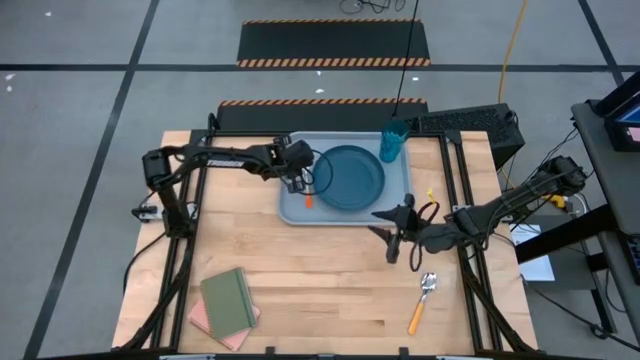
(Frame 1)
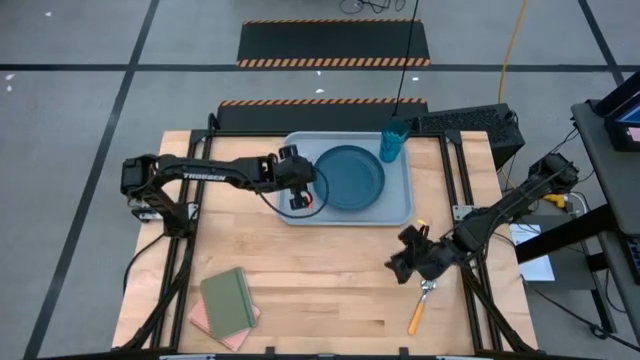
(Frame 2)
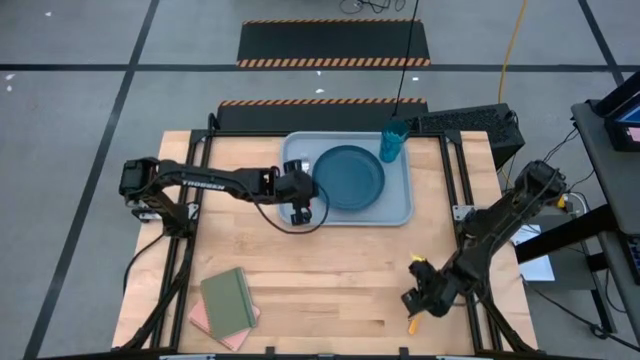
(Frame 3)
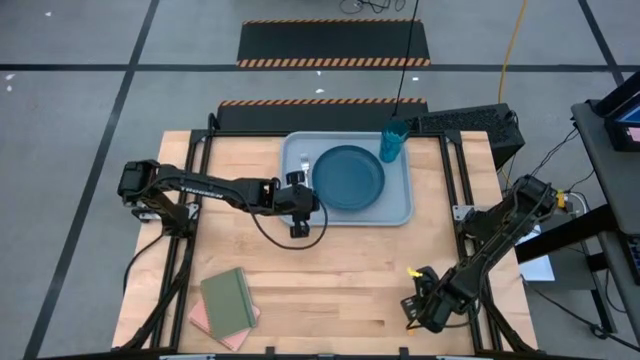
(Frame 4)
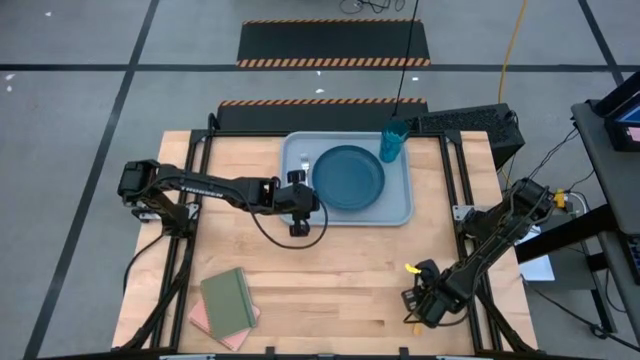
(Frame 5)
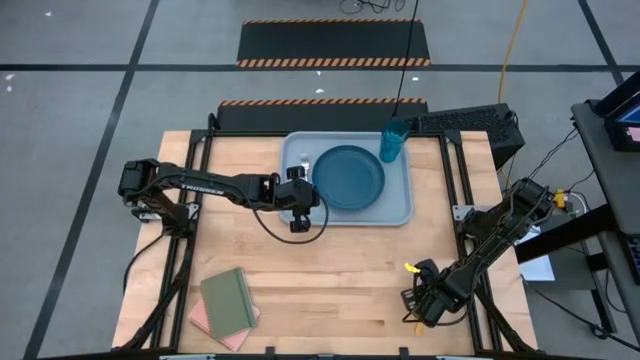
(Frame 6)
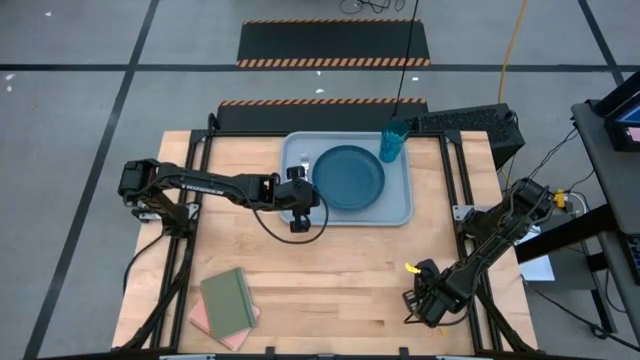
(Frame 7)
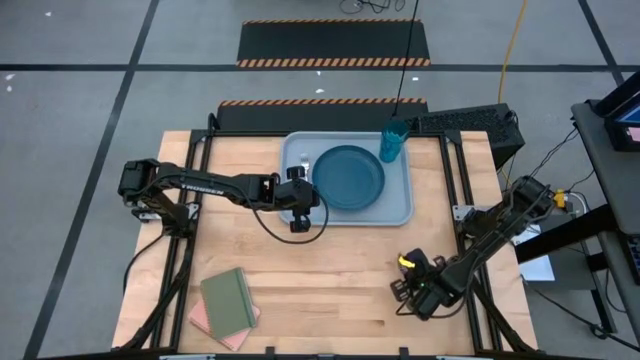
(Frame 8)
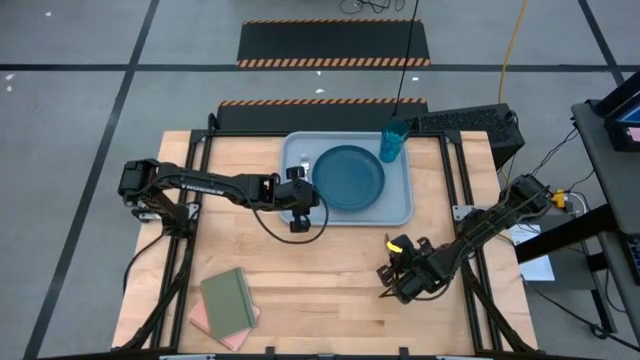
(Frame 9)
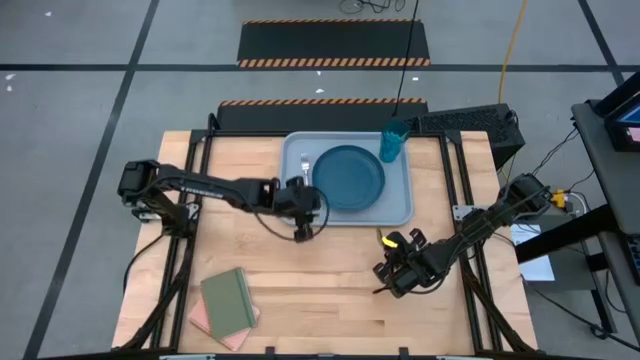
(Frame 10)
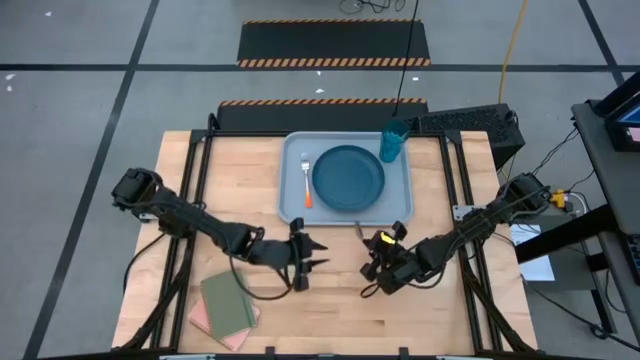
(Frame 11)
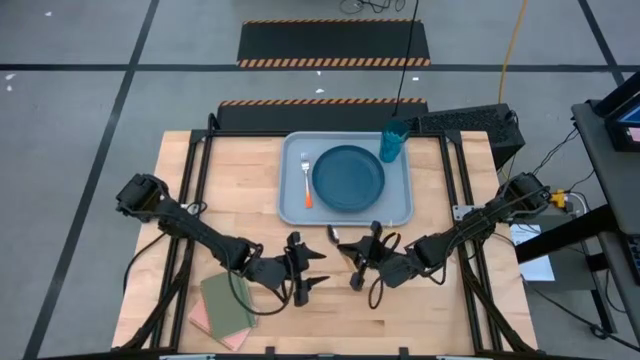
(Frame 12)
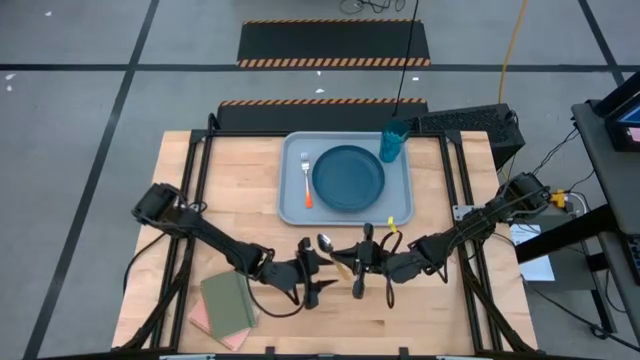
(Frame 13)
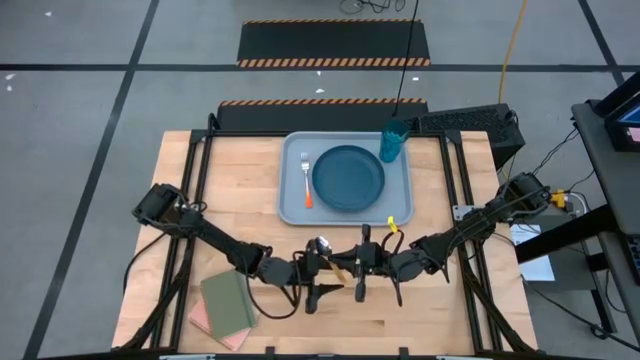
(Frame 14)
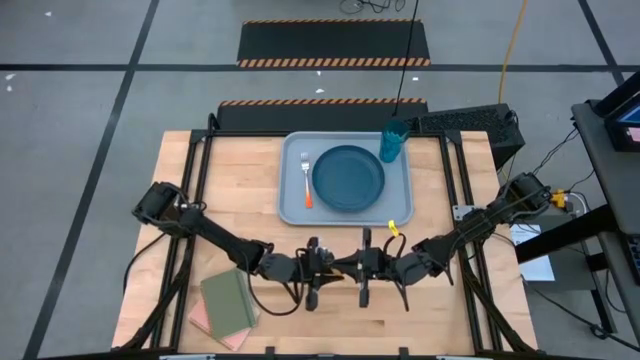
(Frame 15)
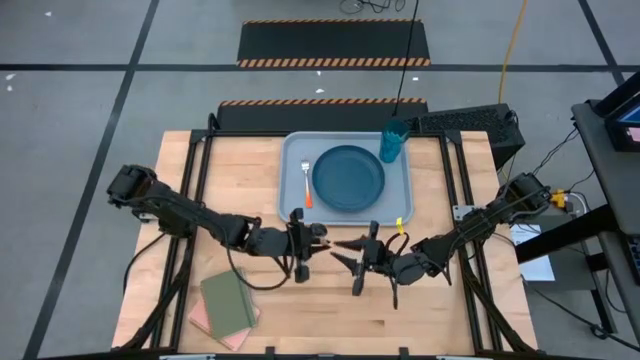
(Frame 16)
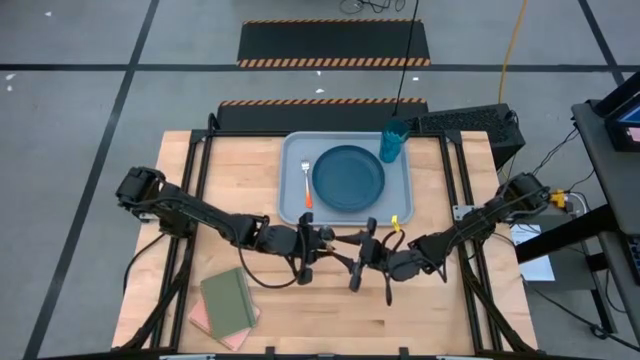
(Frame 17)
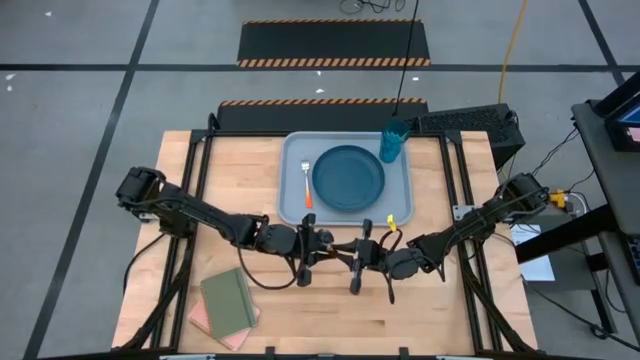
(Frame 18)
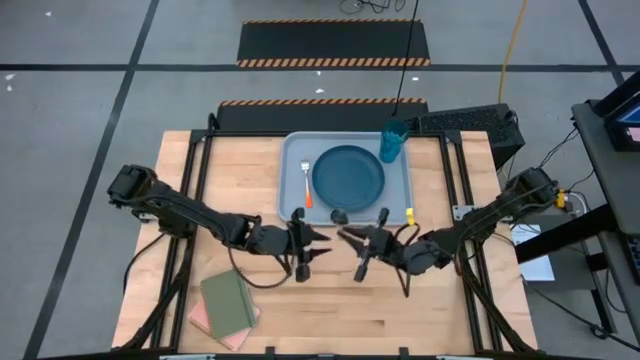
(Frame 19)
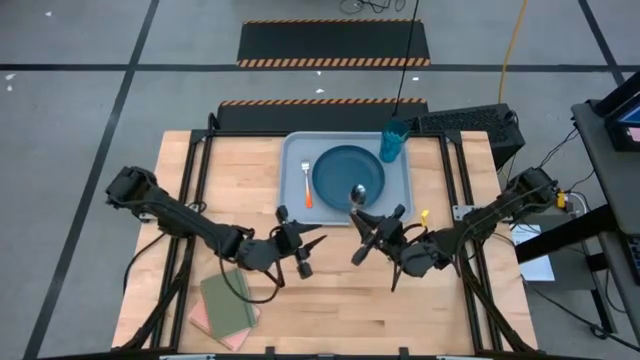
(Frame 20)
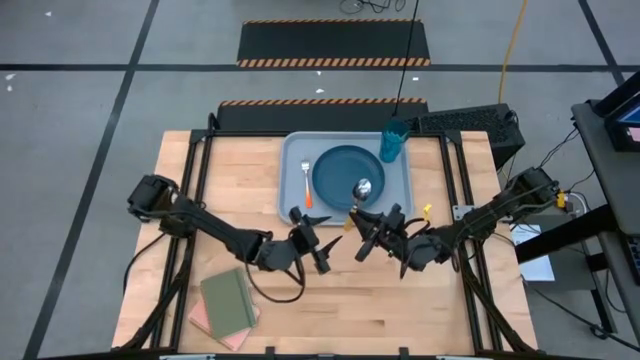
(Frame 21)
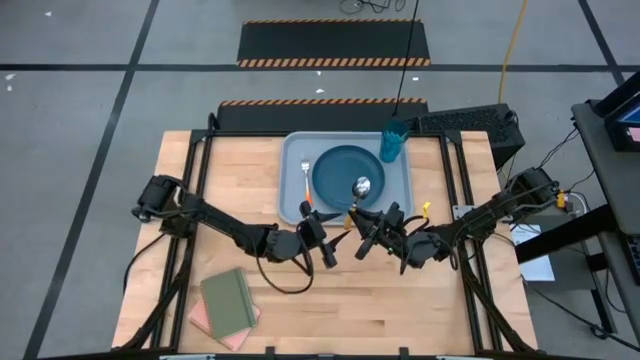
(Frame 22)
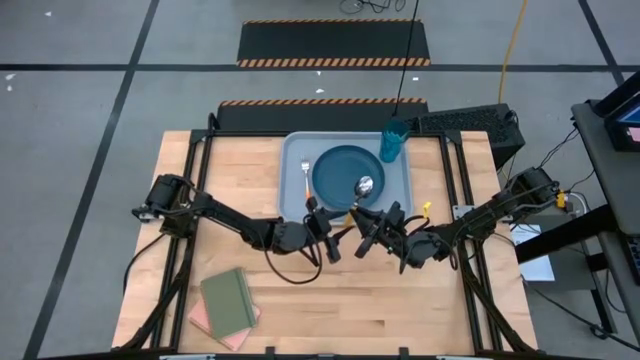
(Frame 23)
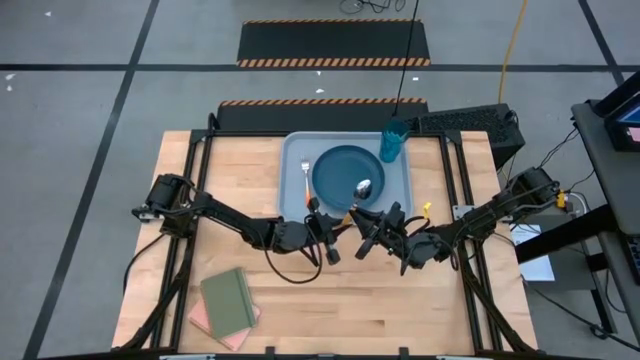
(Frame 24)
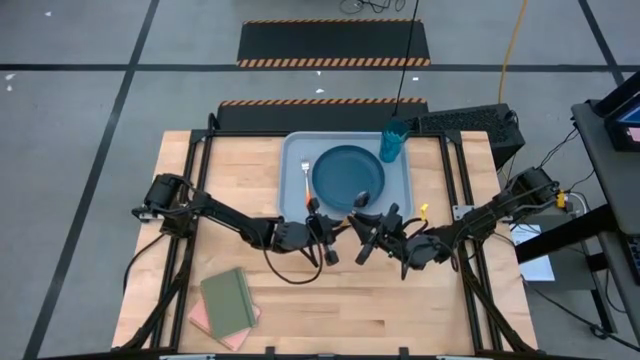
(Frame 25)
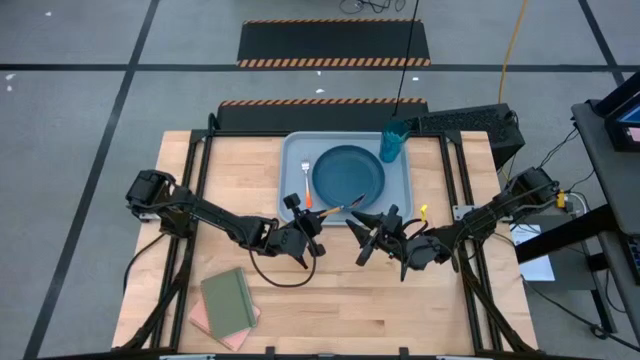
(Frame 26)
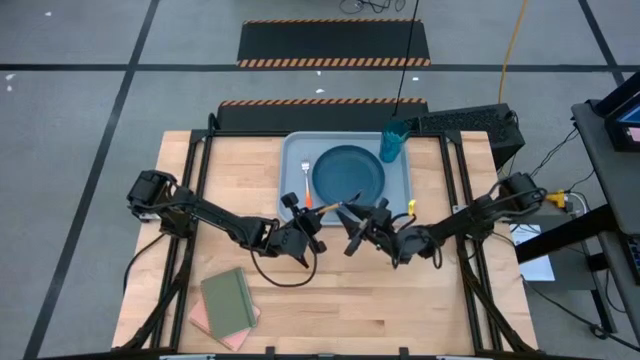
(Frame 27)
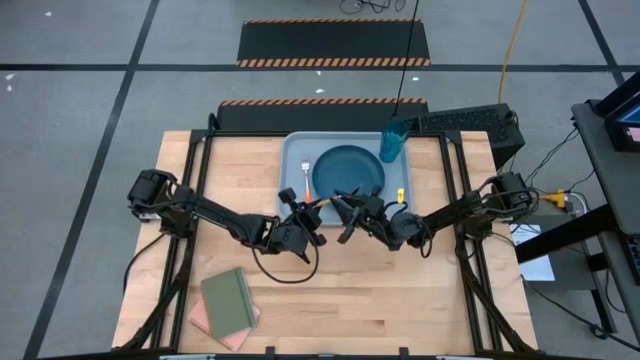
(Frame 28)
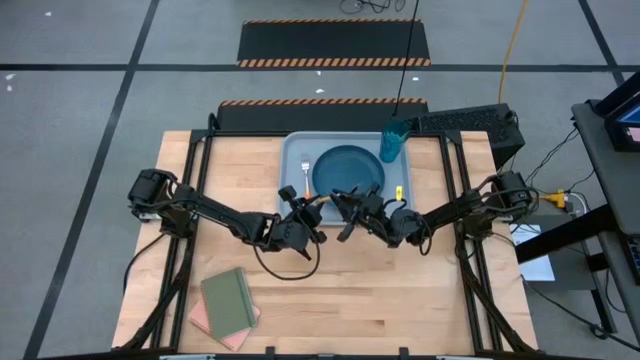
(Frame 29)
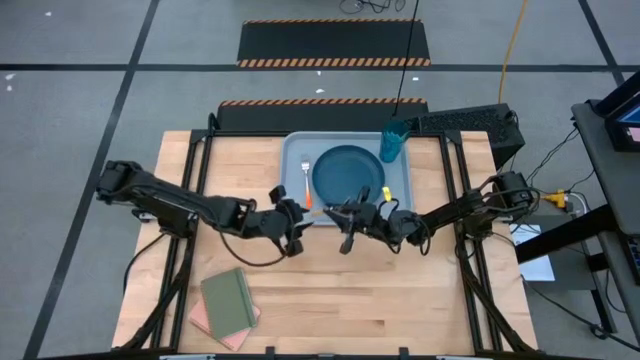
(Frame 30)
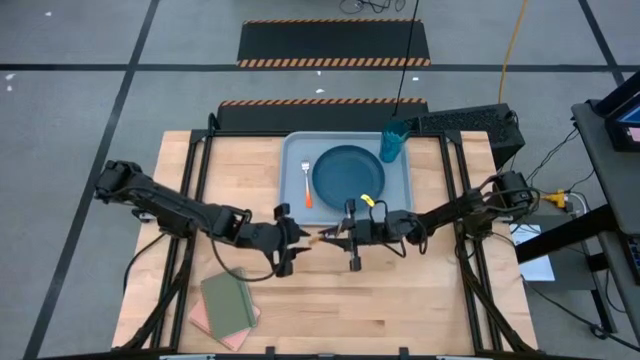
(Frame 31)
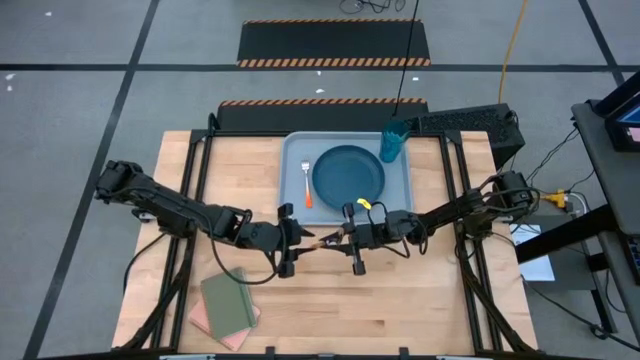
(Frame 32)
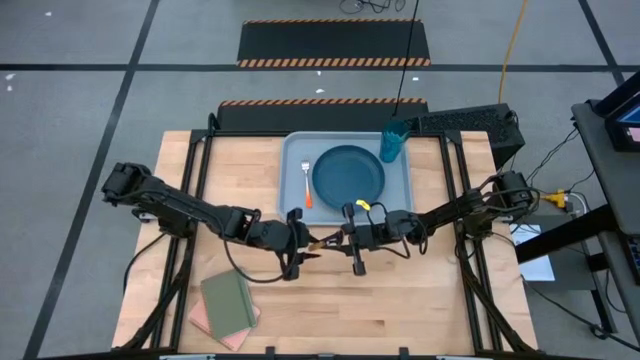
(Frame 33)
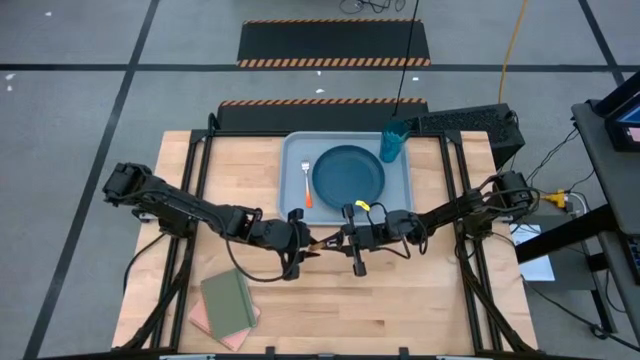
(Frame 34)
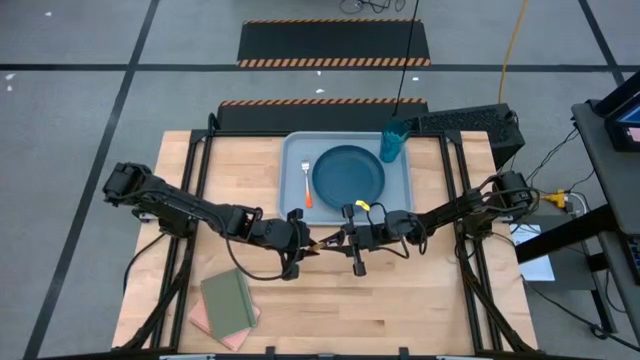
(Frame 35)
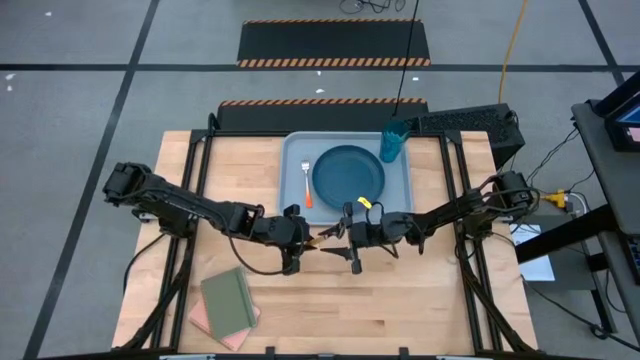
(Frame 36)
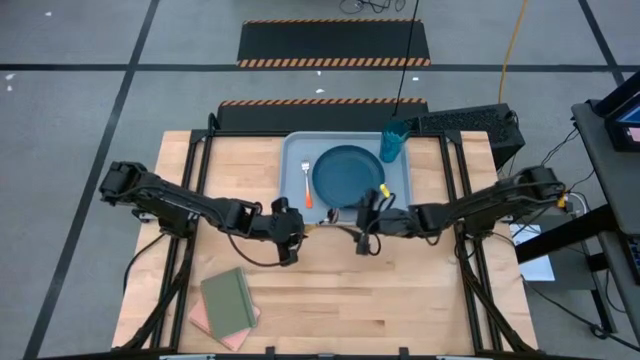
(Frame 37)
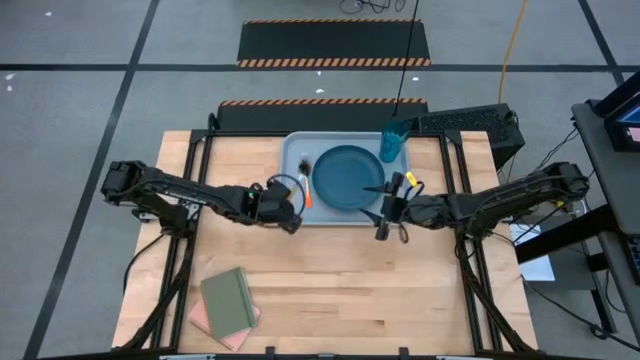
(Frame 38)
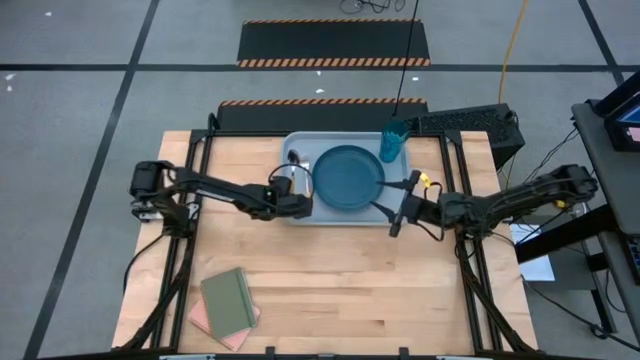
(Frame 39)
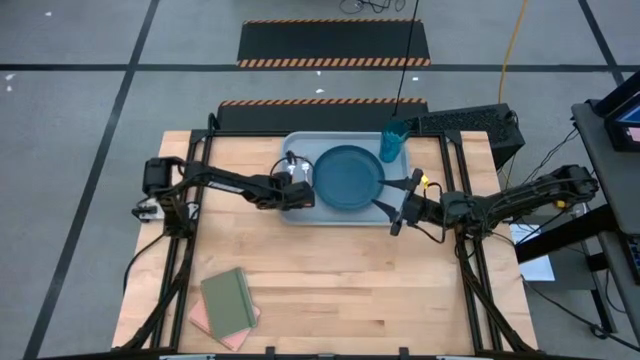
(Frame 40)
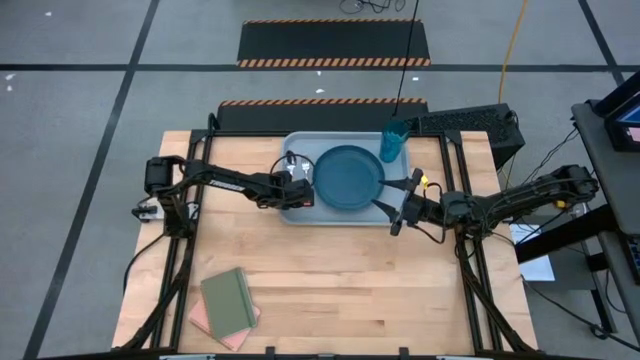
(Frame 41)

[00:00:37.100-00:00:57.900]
Task: Pick and place plate/cup/fork/spoon on tray
Put the yellow spoon to the left of the orange fork on the blue tray

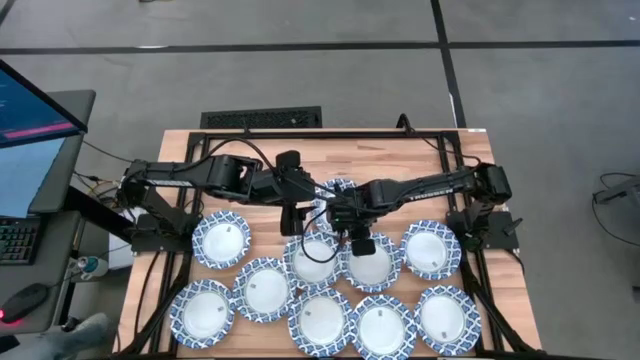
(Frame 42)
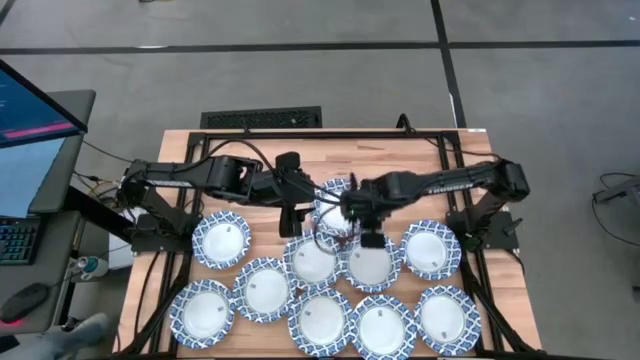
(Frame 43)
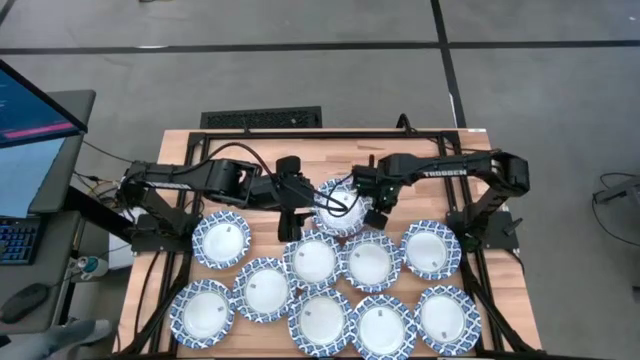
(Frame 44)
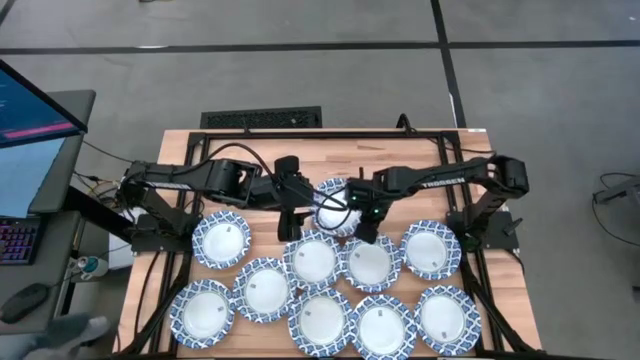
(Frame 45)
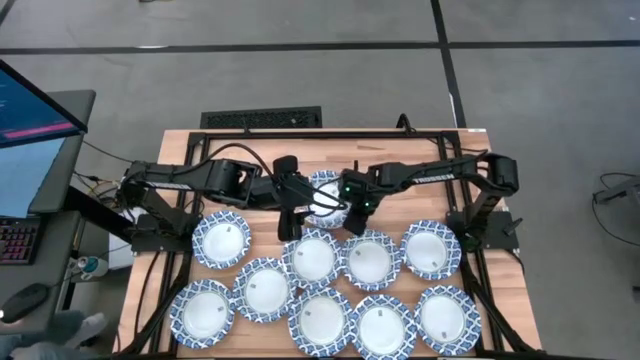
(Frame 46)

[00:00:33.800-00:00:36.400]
Task: Nest bowls inside each other
Adjust the white stacked bowls
